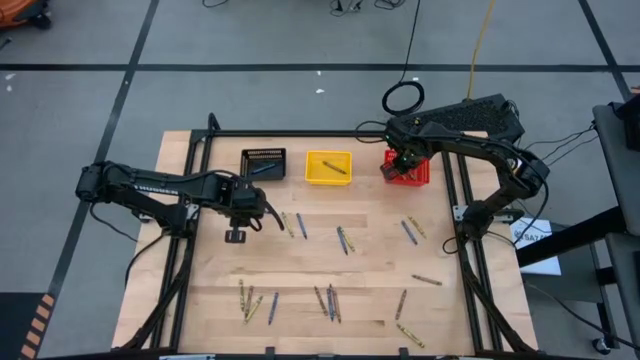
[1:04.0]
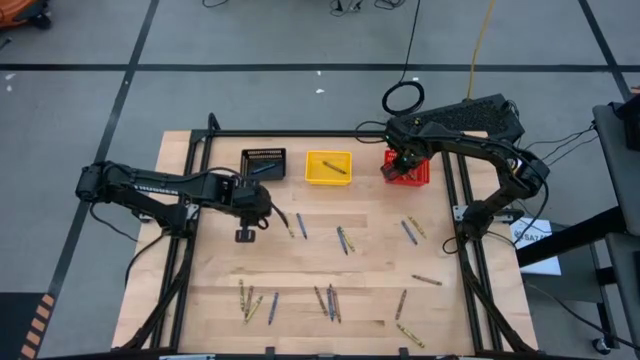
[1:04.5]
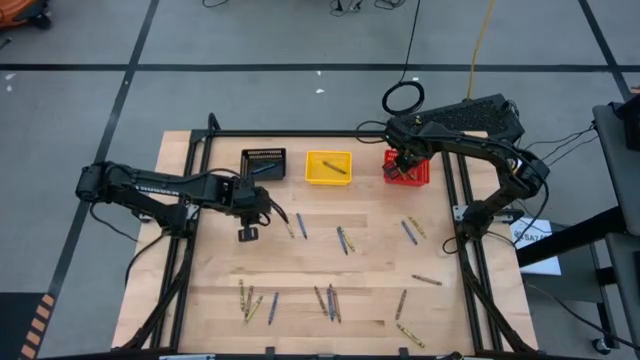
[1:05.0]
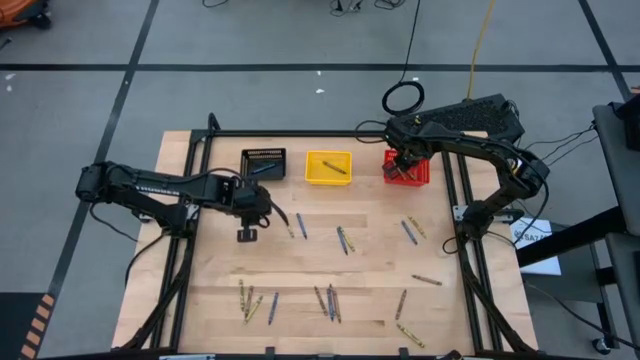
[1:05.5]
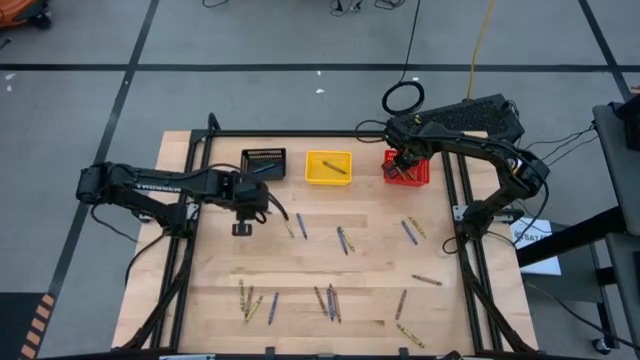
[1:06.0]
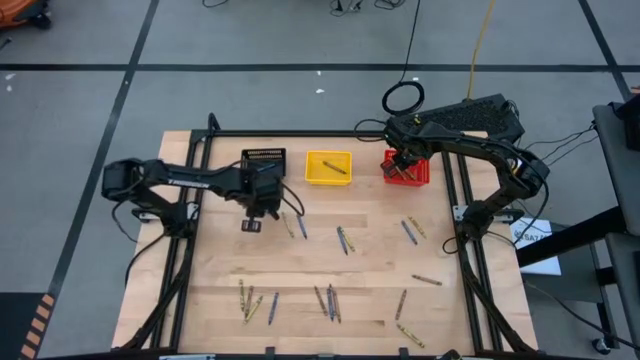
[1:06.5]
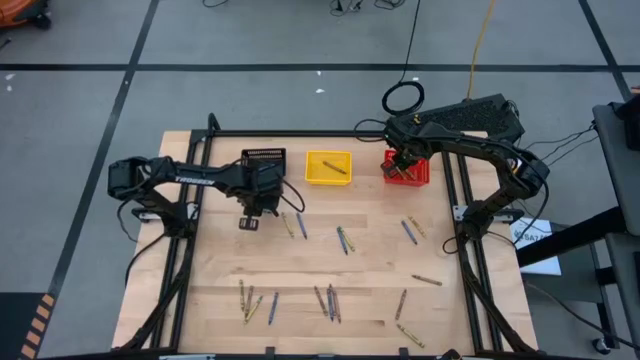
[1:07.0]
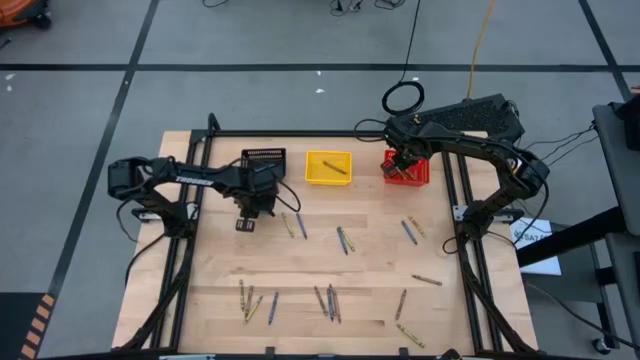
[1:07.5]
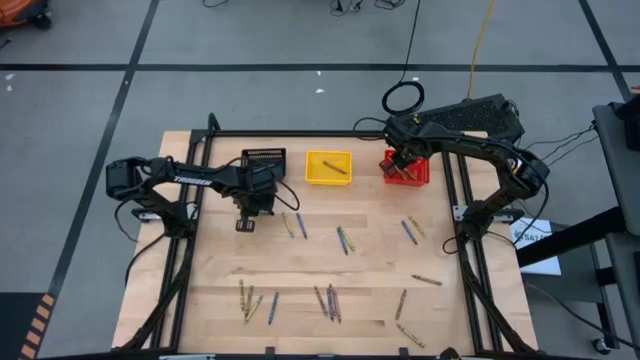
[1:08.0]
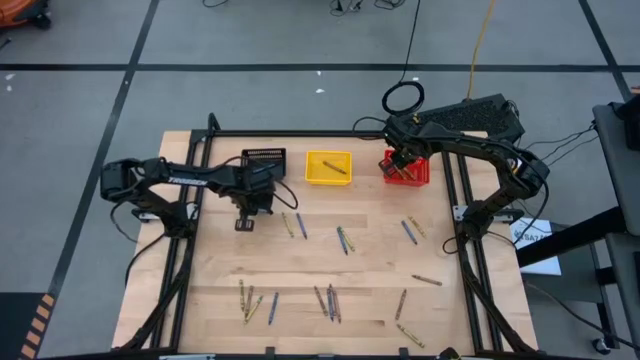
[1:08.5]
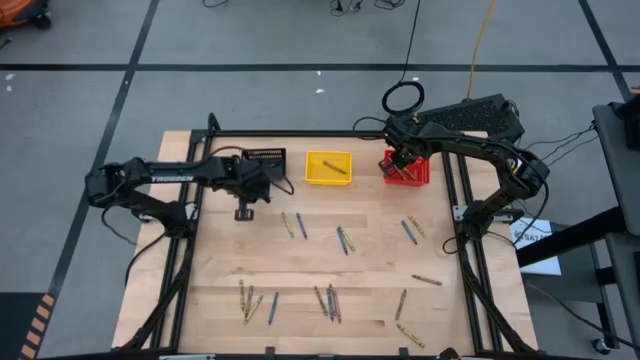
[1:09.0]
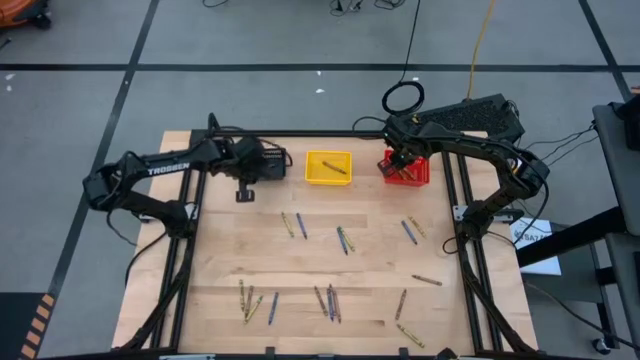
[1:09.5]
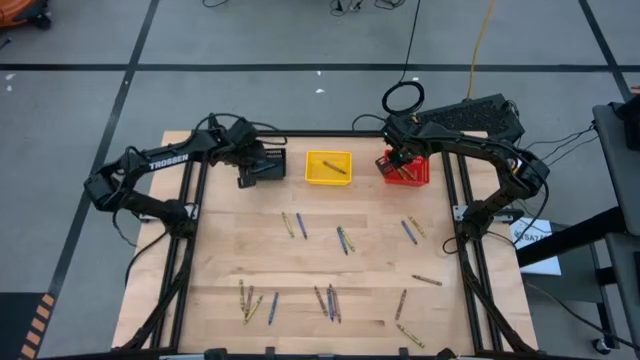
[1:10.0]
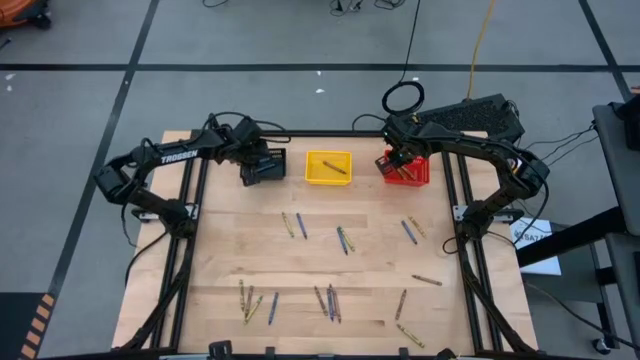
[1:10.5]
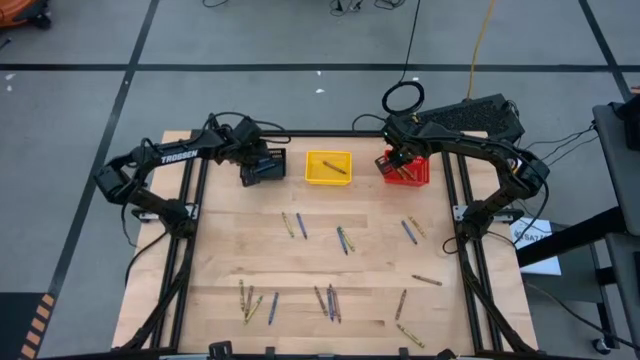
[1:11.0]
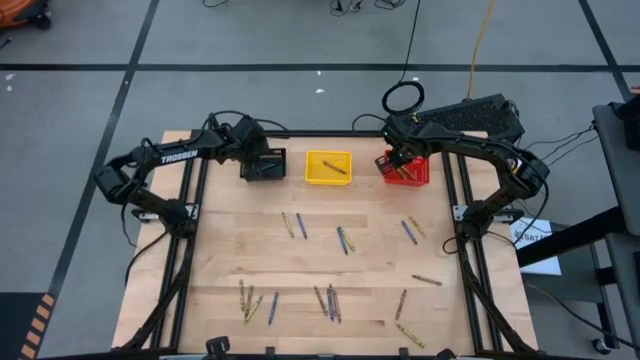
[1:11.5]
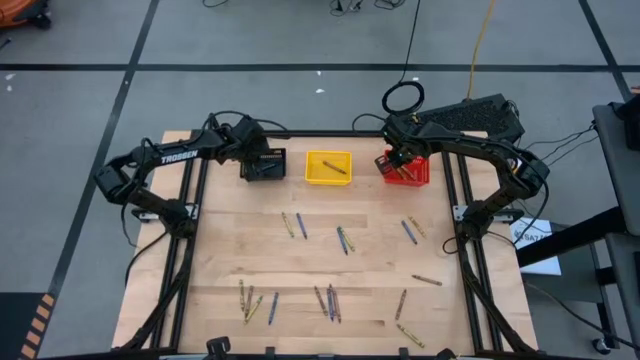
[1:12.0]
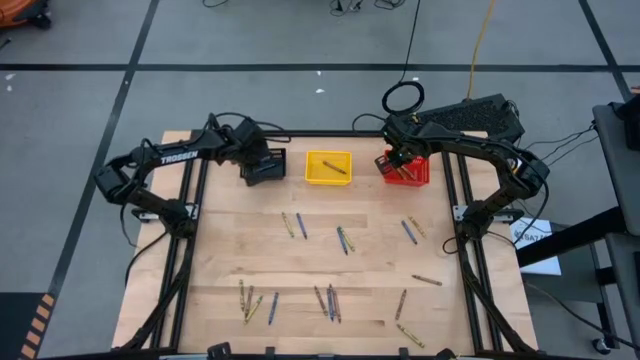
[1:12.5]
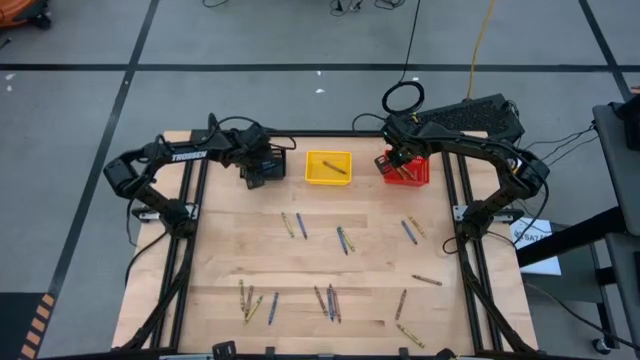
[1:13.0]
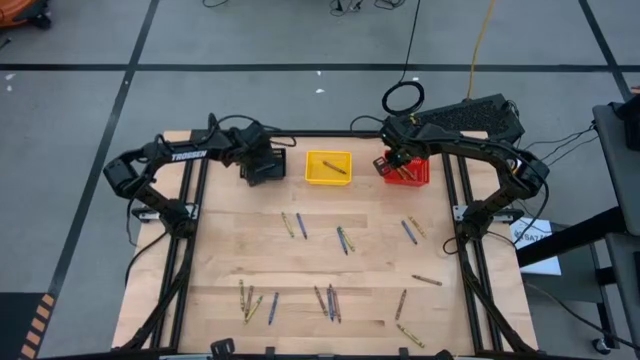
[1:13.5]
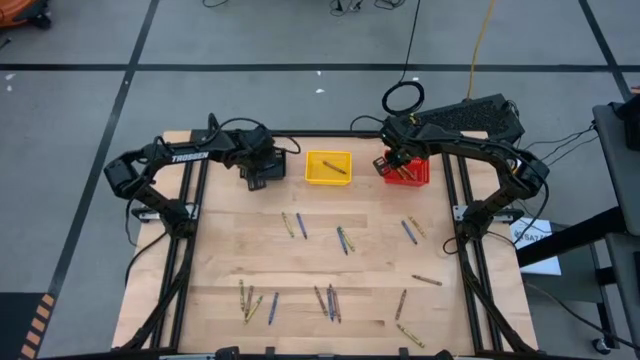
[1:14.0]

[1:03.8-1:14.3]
Task: Sort crayons
Put the blue crayon into the black bin

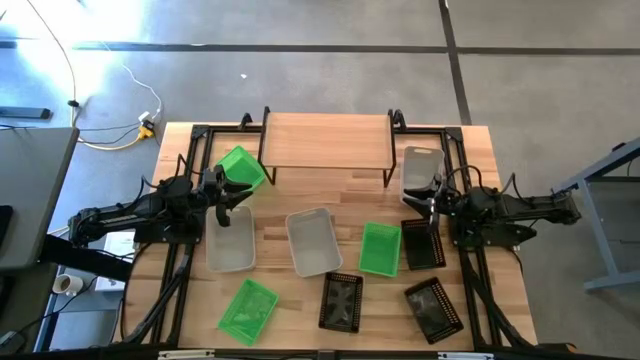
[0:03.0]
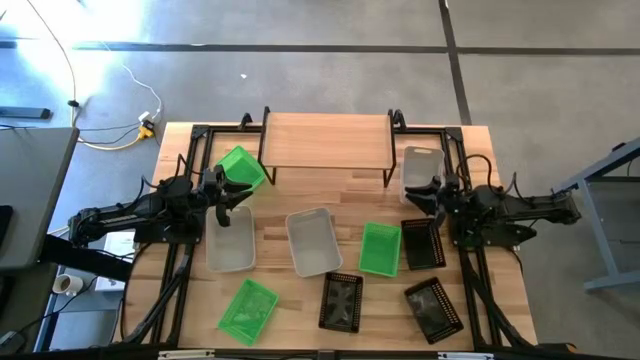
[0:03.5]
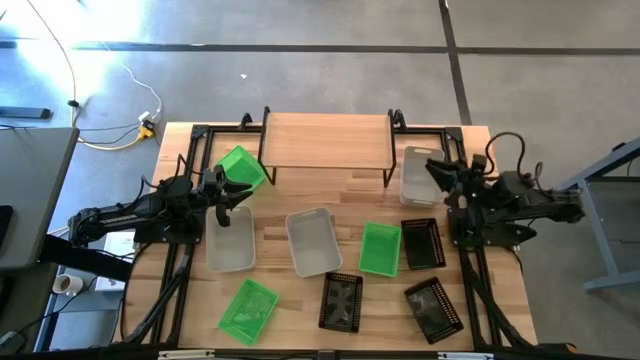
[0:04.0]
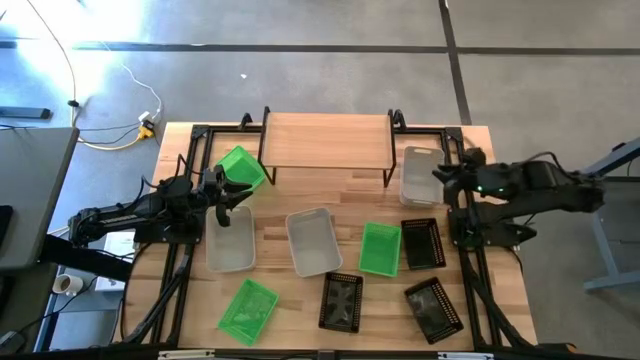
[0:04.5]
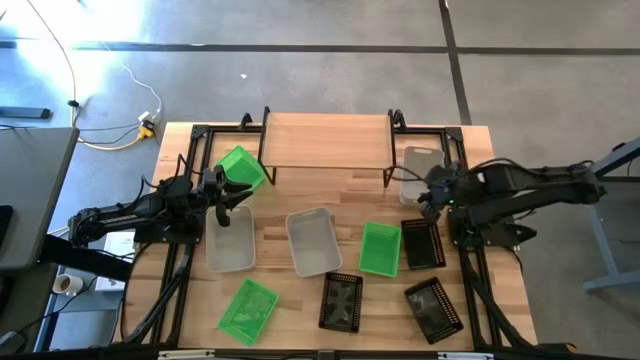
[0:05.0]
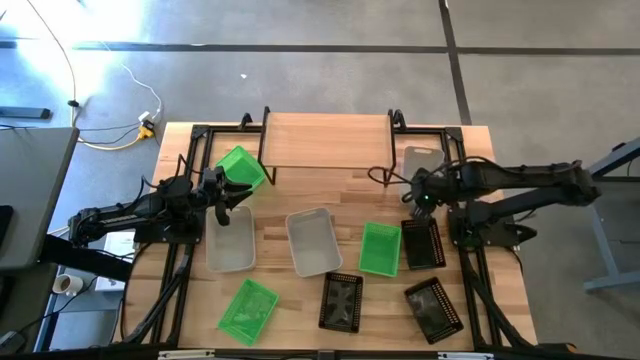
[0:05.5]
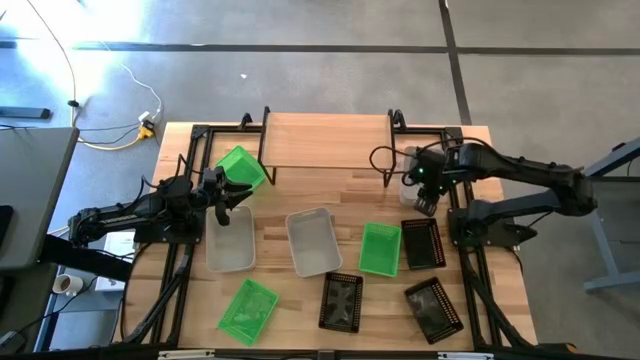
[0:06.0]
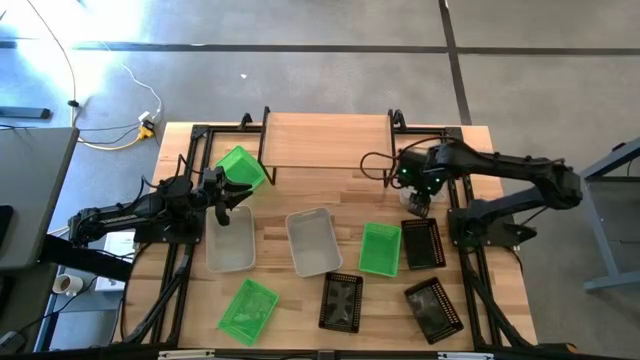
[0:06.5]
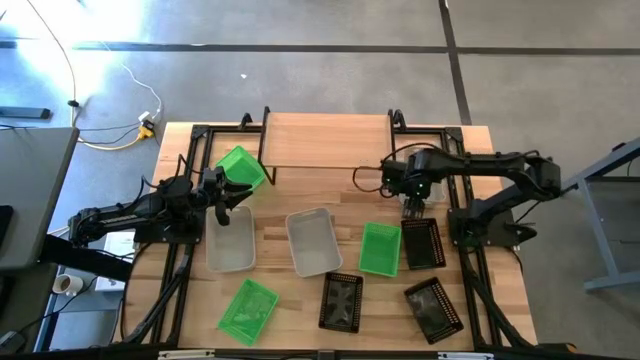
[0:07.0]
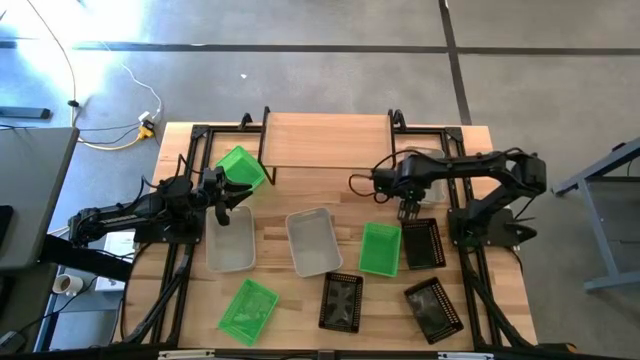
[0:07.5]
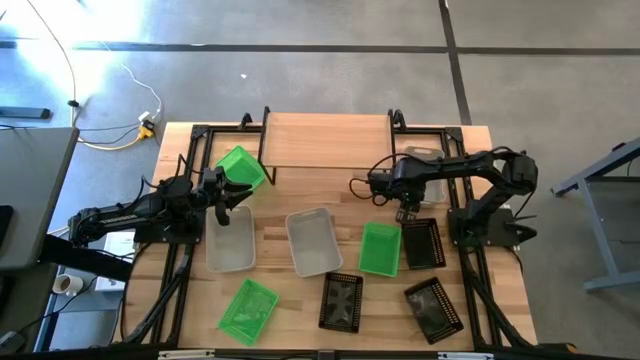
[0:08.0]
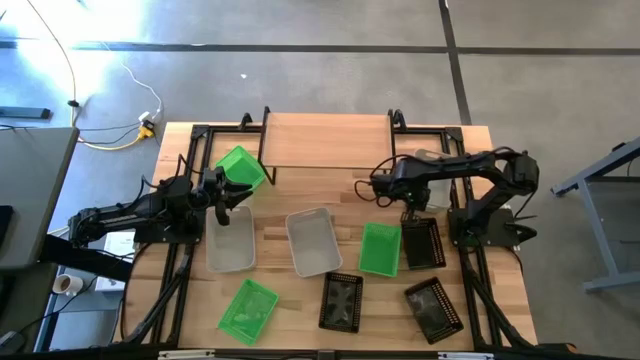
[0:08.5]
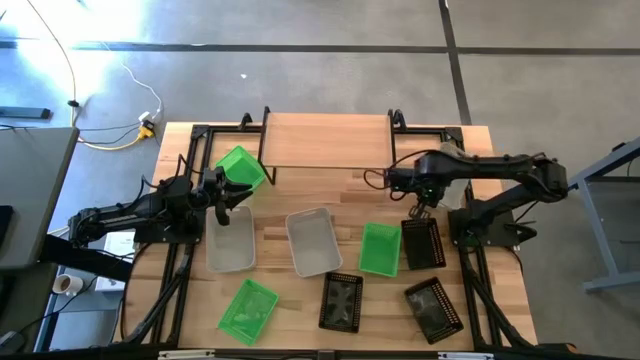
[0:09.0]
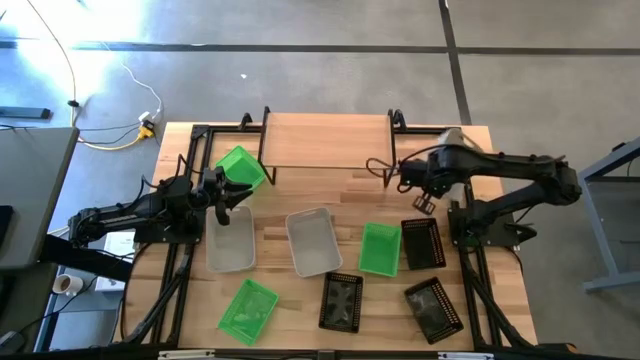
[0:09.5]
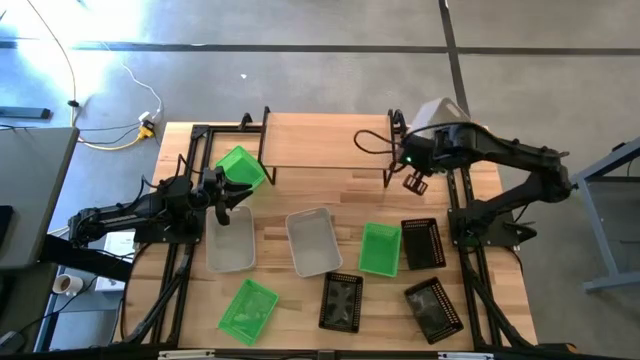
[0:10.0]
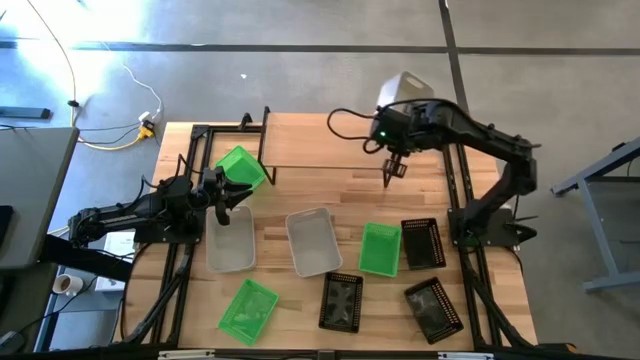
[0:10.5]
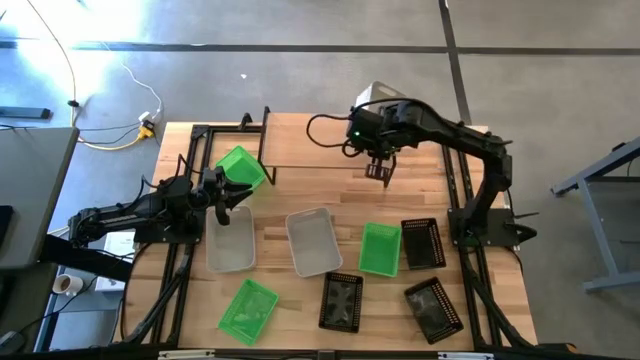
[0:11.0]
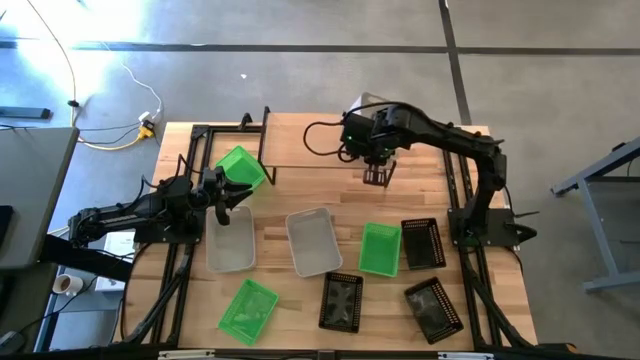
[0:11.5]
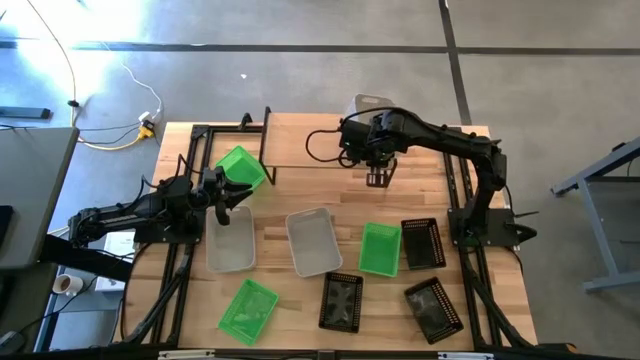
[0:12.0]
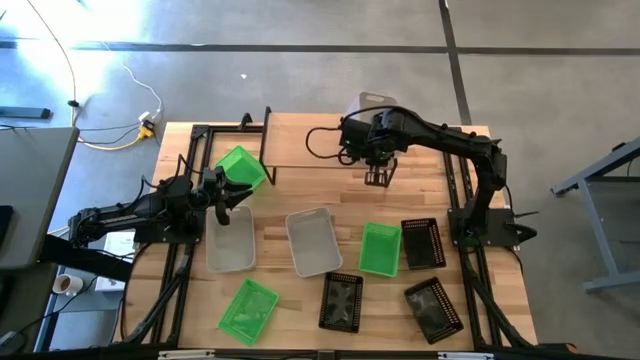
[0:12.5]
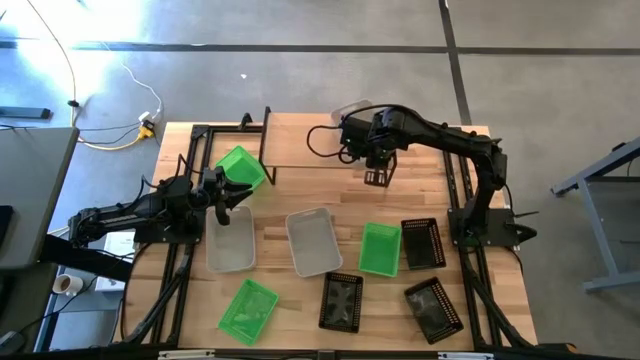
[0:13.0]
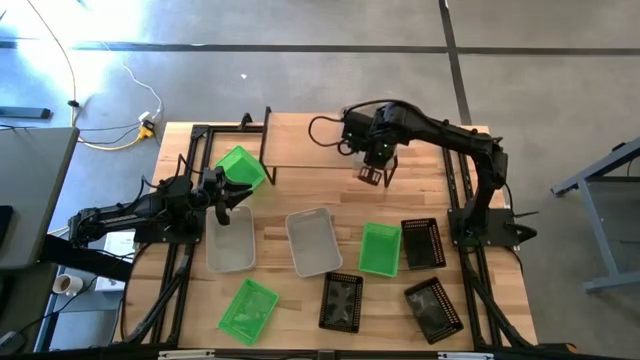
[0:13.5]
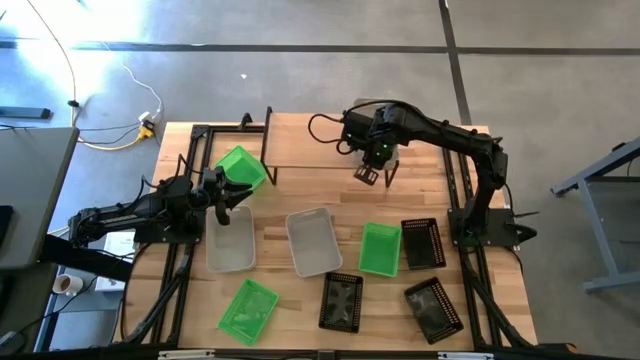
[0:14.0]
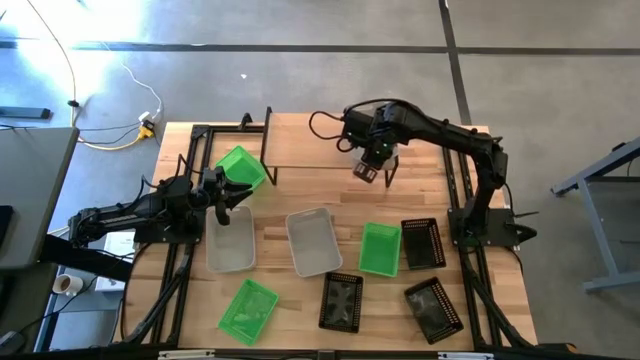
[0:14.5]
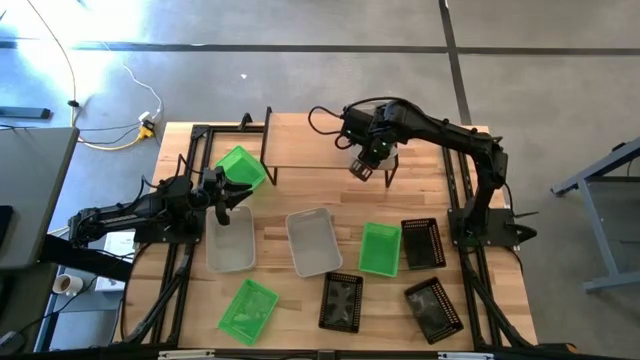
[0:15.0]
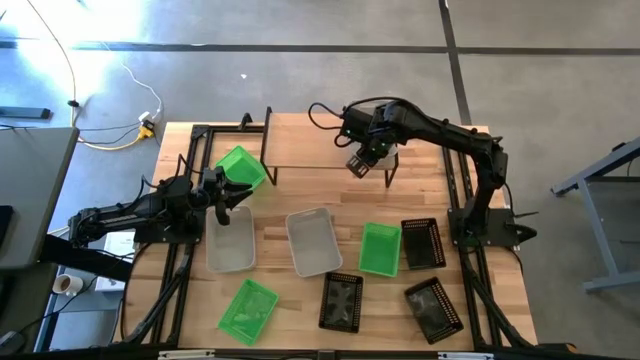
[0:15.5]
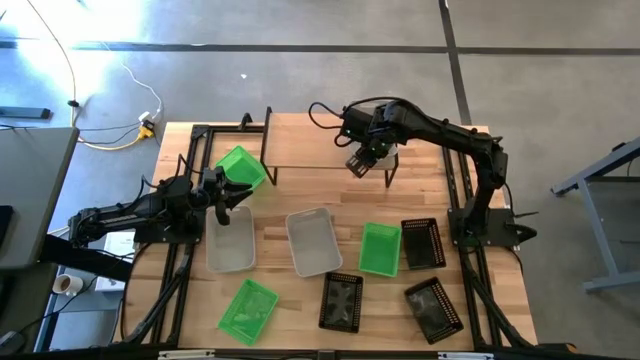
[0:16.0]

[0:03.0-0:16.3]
Task: Stack baskets on shelf by color
Put the top gray bin on the shelf
